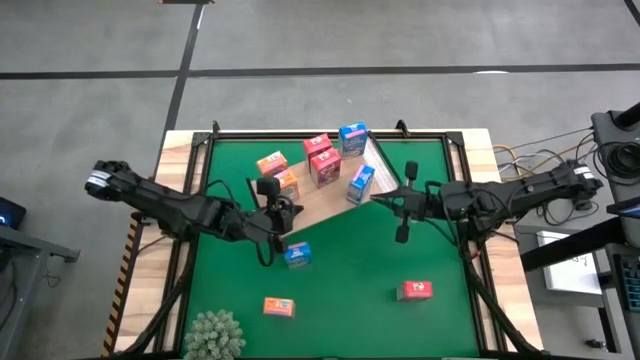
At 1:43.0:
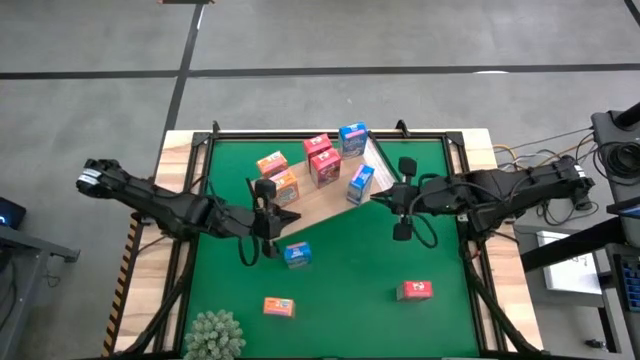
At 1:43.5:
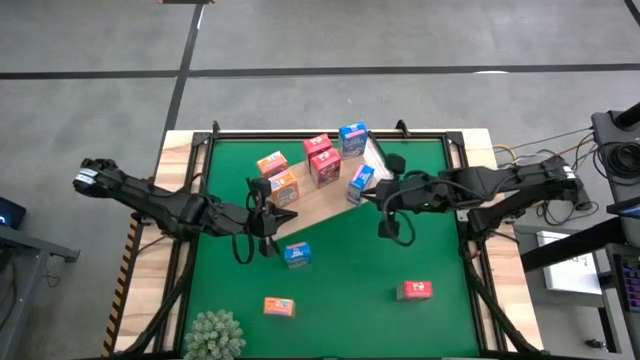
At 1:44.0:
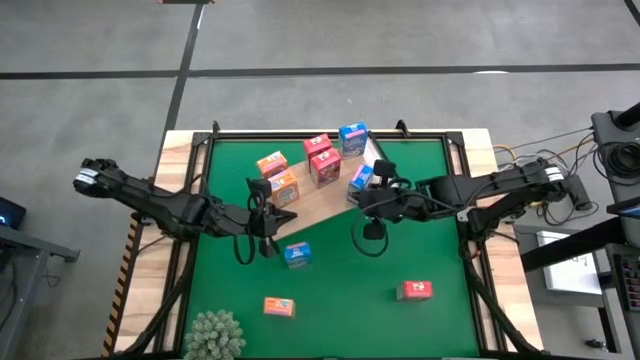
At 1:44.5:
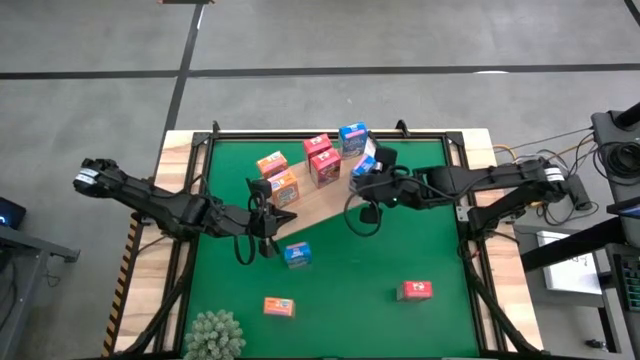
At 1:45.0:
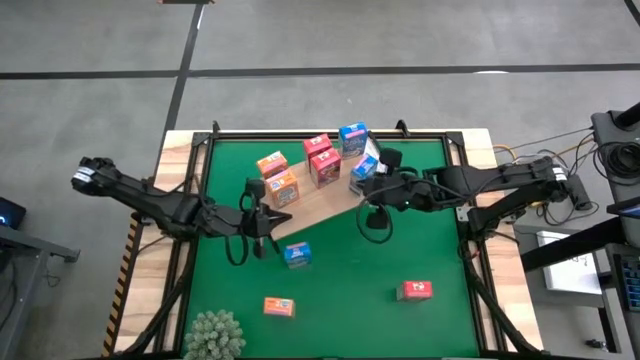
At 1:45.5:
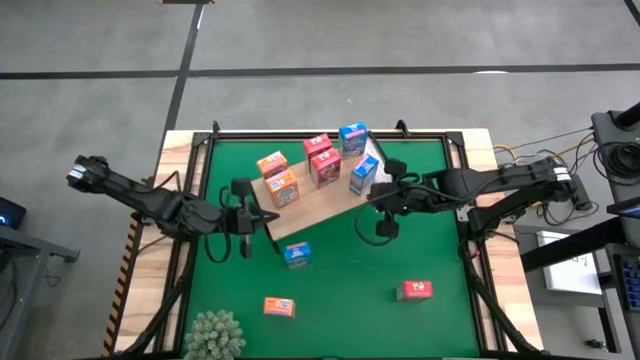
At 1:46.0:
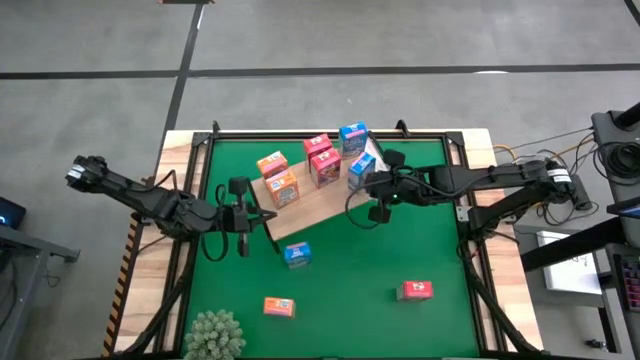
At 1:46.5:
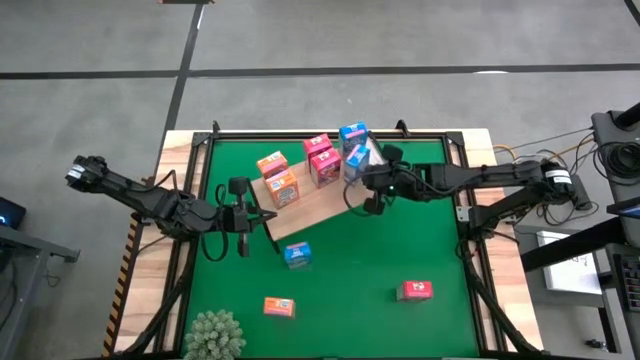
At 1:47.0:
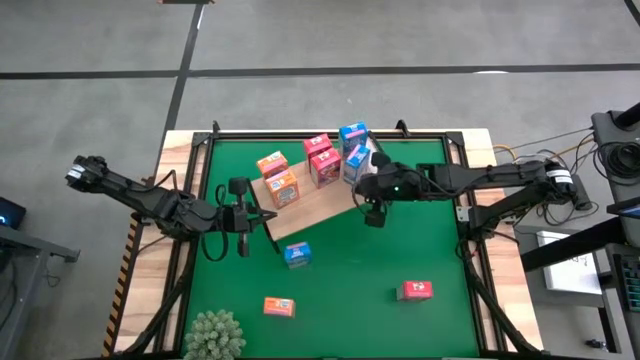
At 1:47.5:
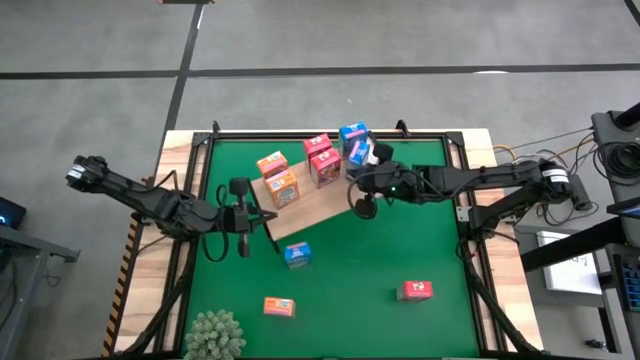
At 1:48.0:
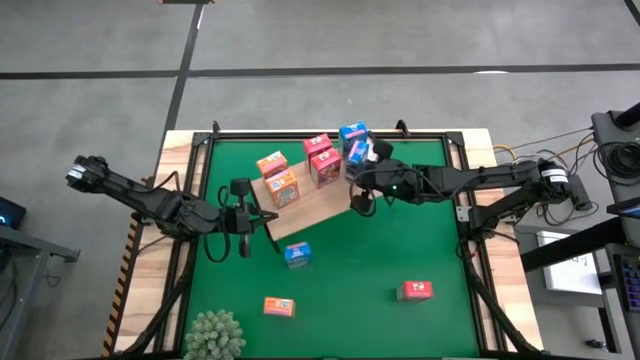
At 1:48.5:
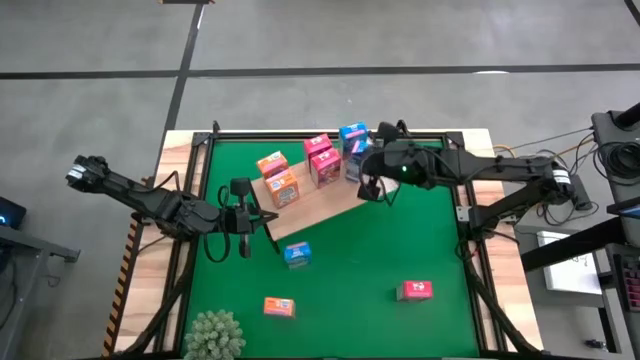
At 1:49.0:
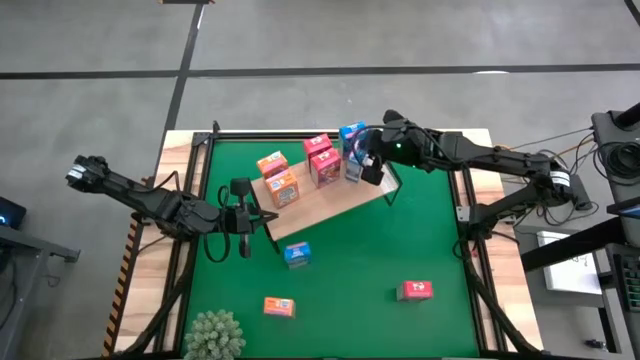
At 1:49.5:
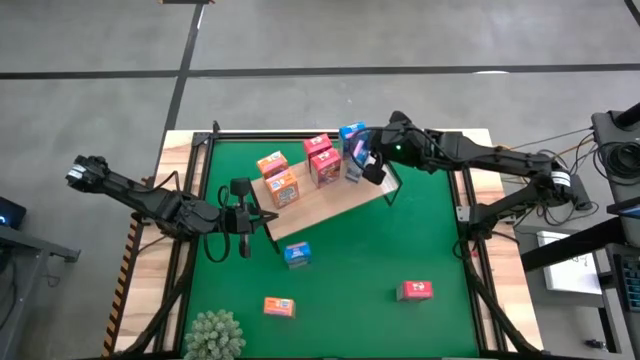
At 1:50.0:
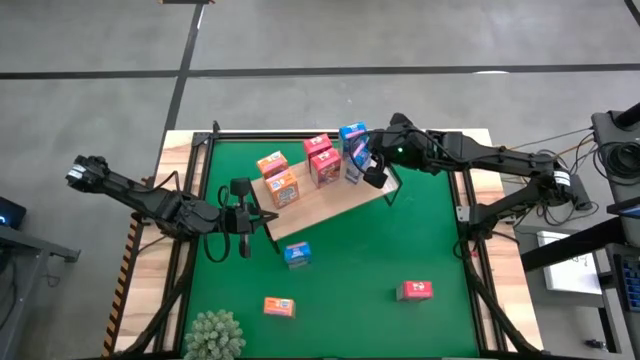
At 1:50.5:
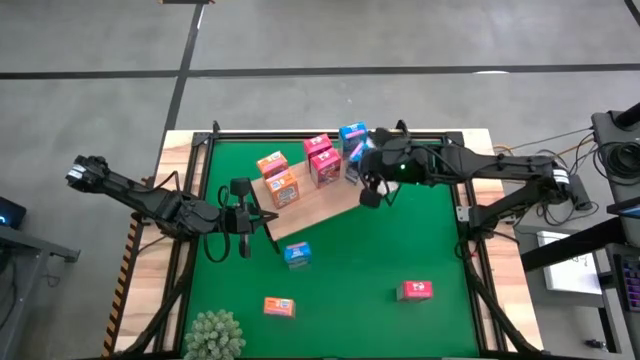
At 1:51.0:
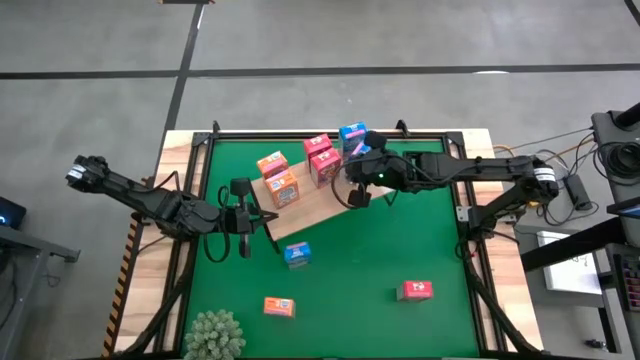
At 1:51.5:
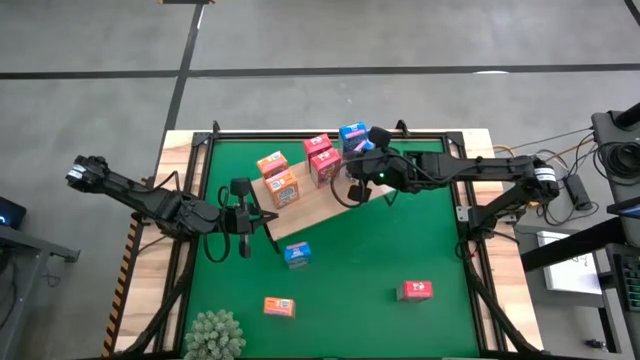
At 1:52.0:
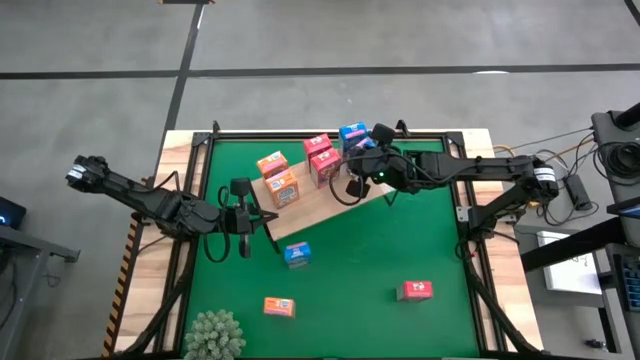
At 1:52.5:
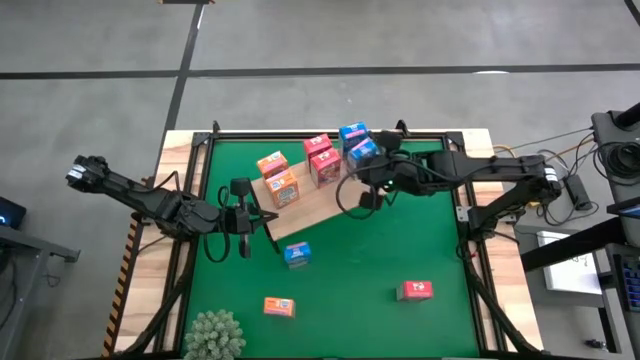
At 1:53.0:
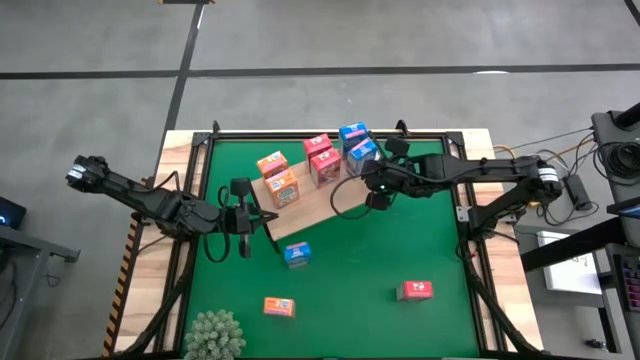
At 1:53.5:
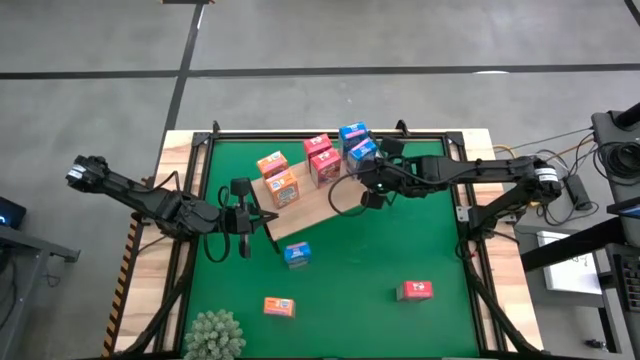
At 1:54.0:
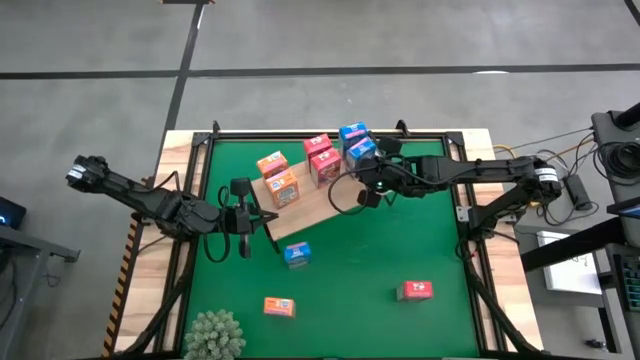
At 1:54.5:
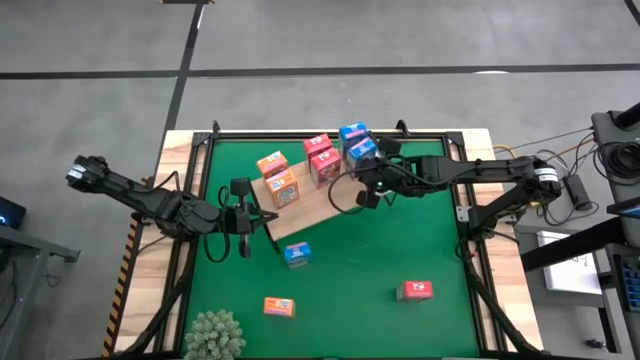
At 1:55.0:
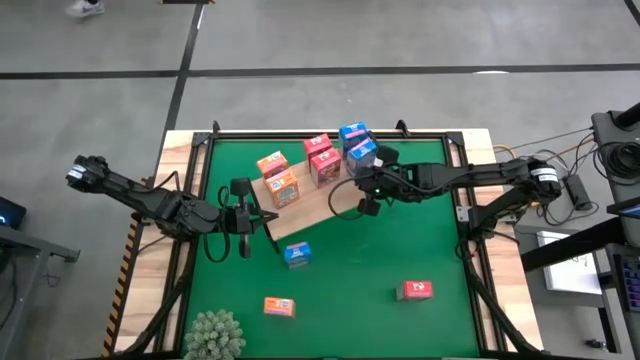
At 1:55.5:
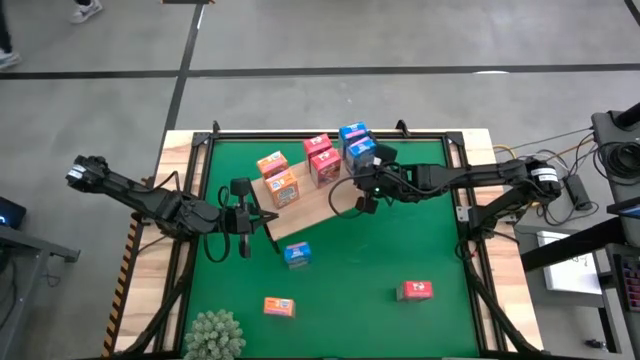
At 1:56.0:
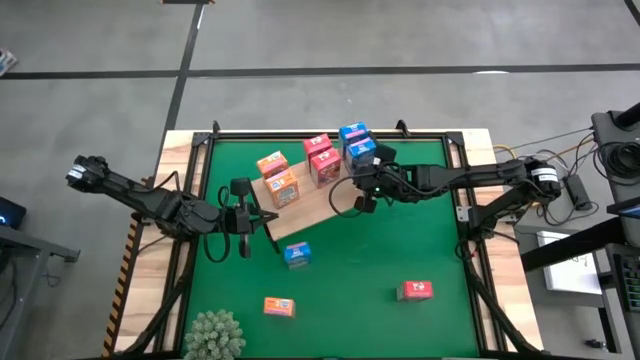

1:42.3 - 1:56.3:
Task: Stack cereal on shelf
Put the left blue cereal box on the shelf aligned with the other blue cereal box

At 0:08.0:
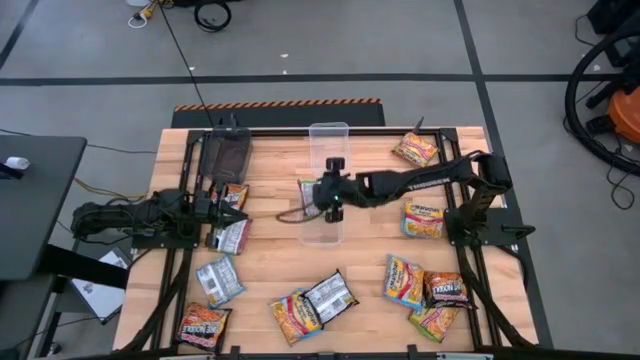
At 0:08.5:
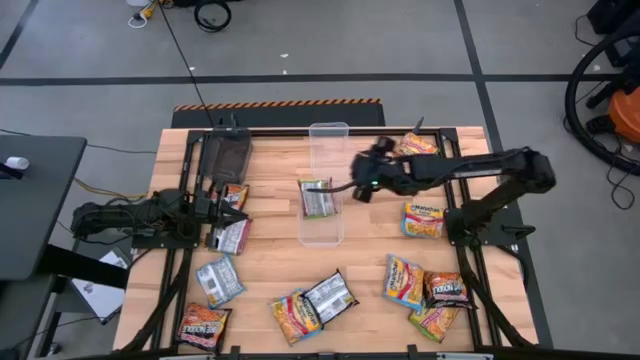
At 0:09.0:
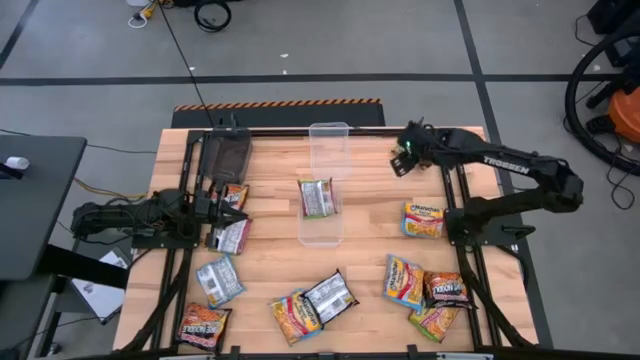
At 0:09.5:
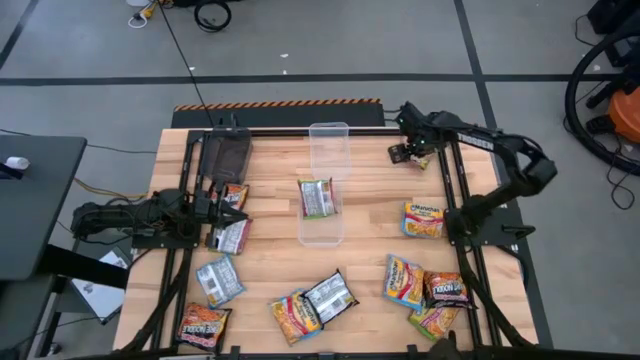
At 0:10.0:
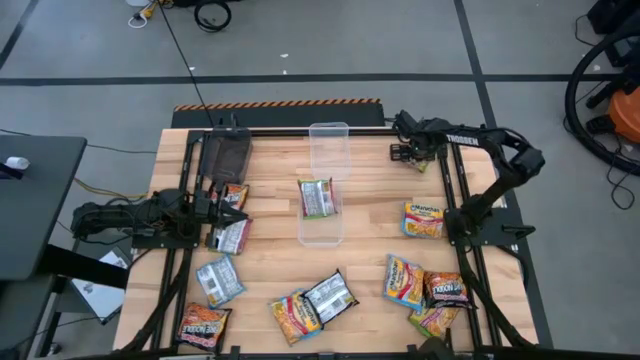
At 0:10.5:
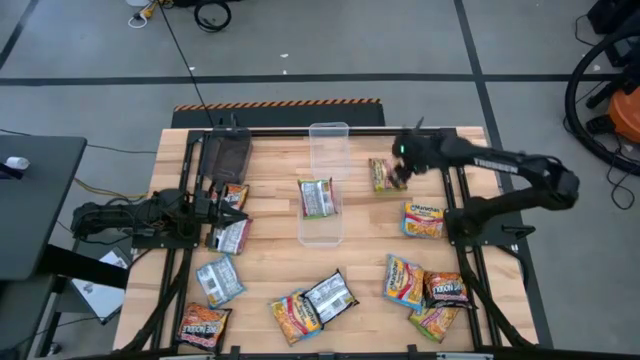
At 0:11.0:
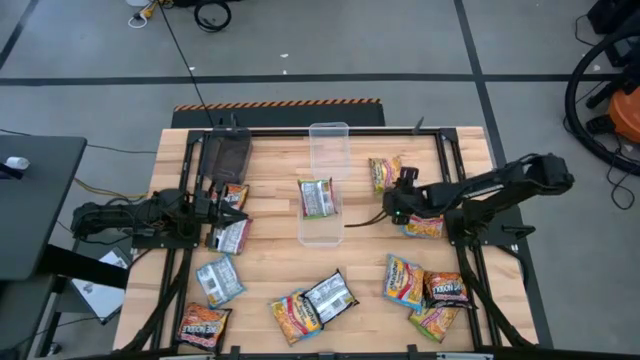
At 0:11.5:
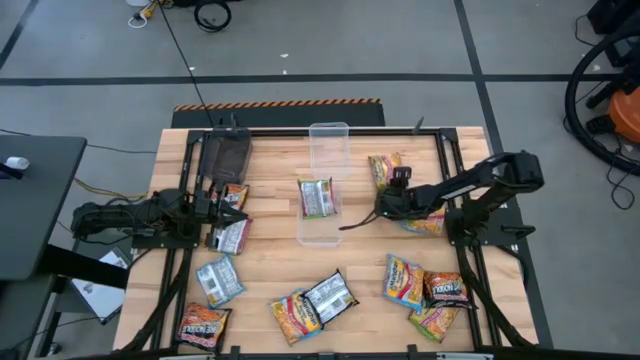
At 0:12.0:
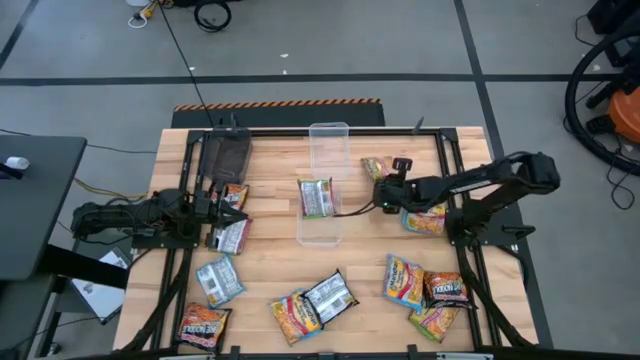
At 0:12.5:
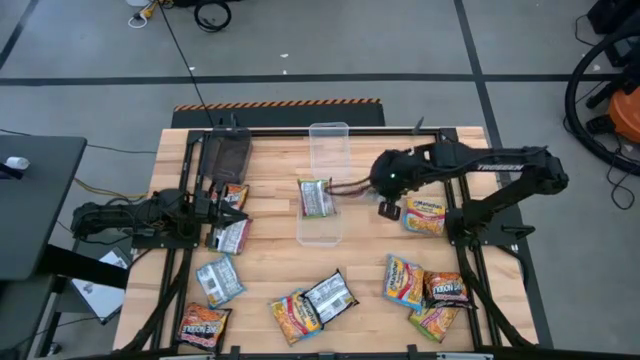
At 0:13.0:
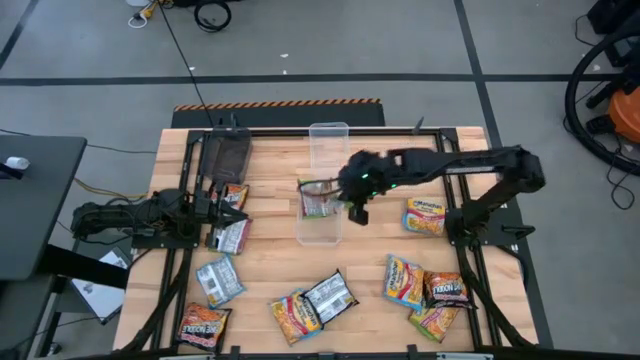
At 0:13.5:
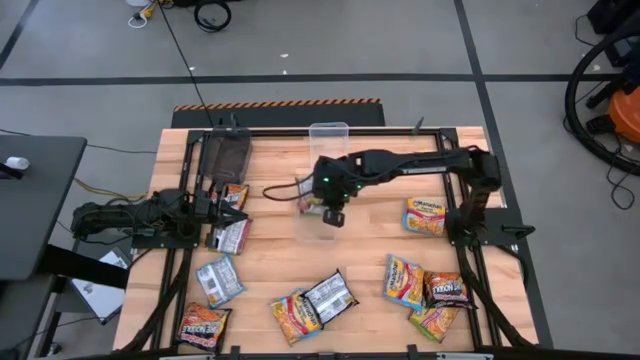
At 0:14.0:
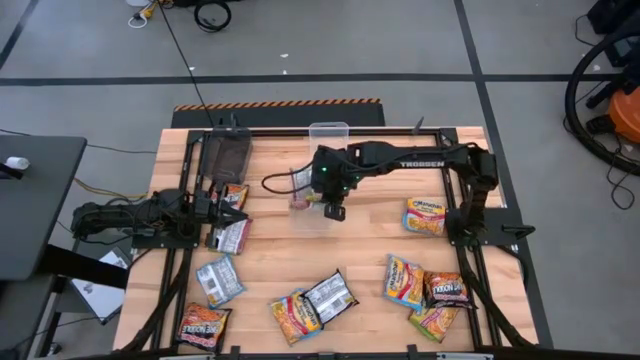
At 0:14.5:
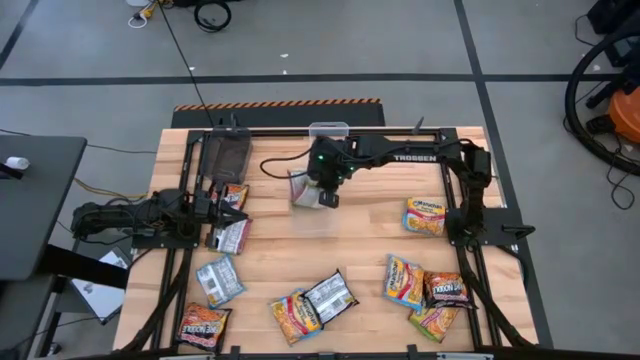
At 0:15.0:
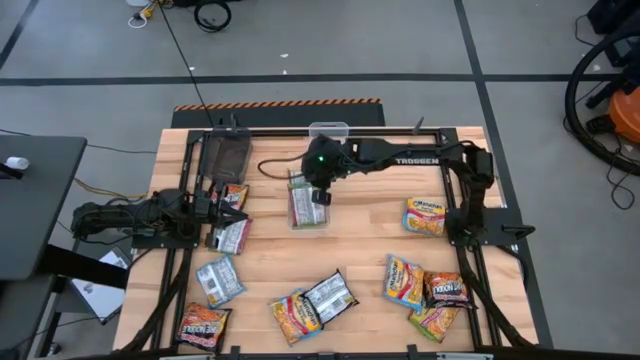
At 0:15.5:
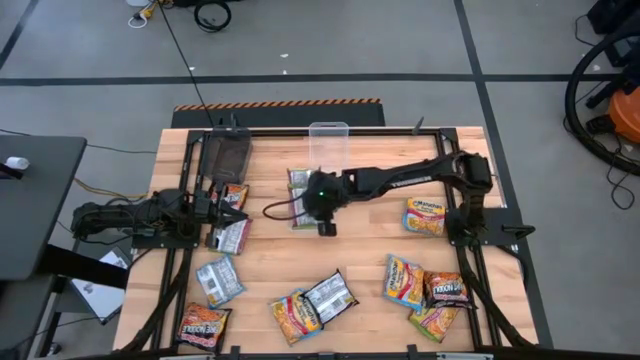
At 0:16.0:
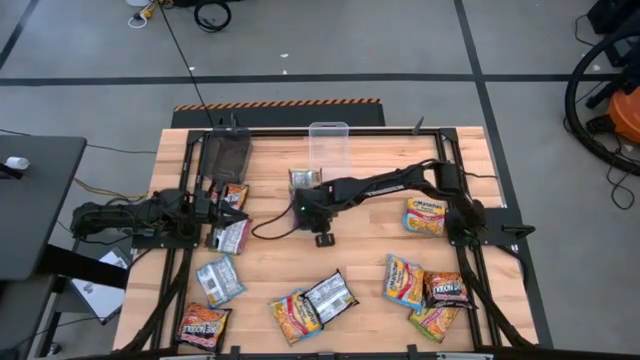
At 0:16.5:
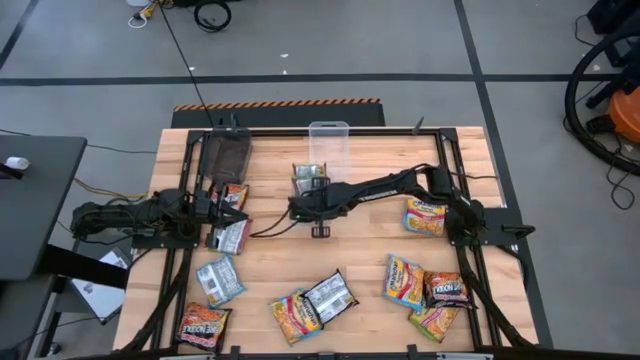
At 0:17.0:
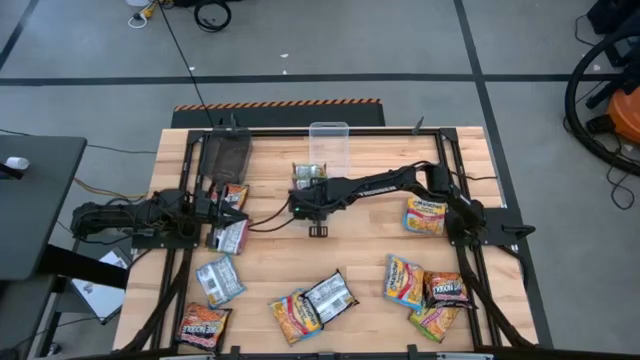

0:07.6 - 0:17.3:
Task: Sort Maruchan noodles
Put the green noodle pack into the bottom transparent bin
